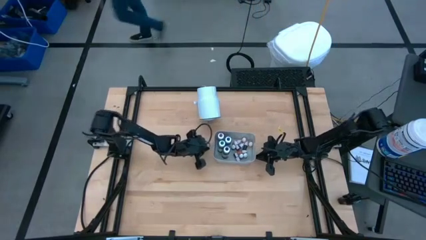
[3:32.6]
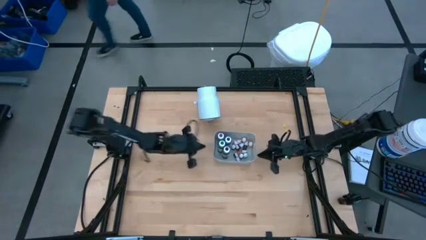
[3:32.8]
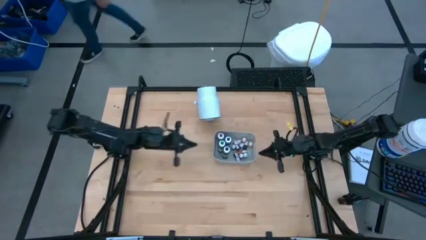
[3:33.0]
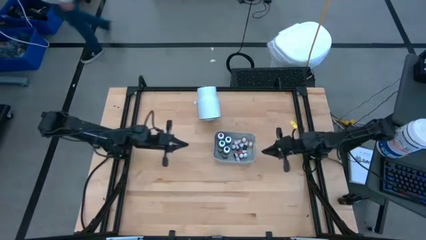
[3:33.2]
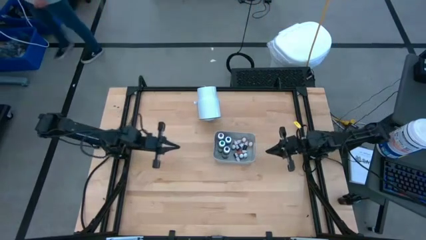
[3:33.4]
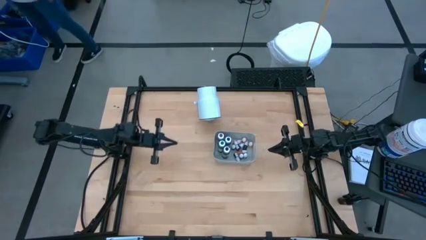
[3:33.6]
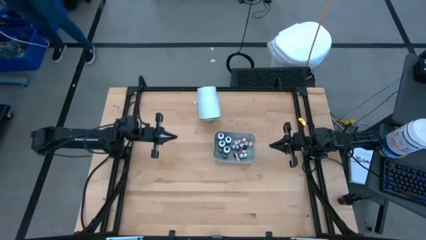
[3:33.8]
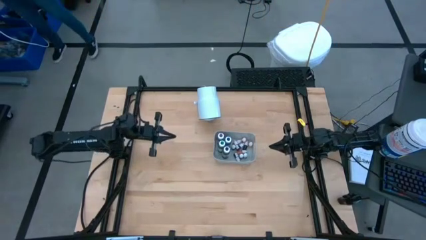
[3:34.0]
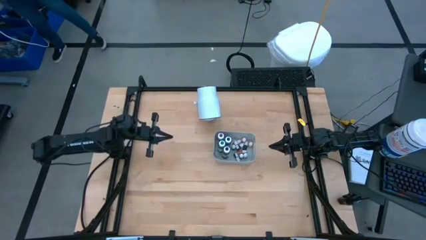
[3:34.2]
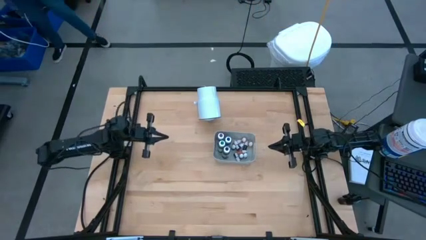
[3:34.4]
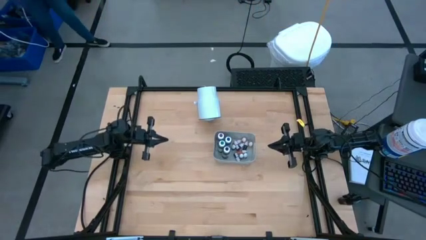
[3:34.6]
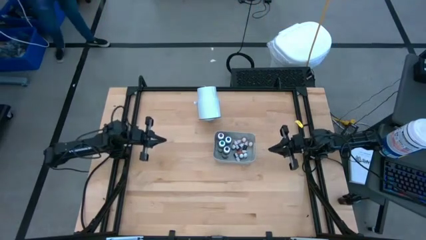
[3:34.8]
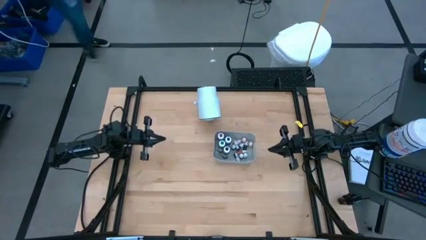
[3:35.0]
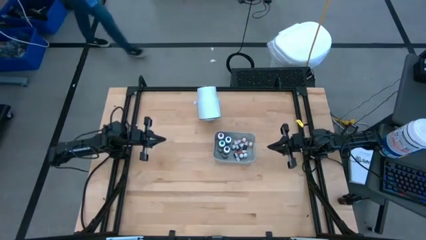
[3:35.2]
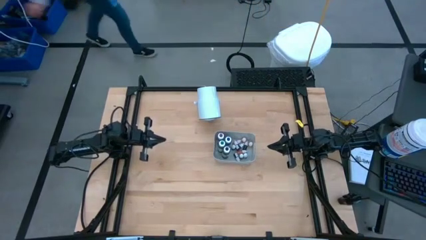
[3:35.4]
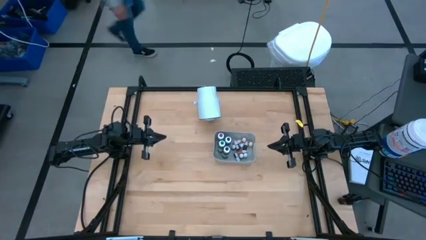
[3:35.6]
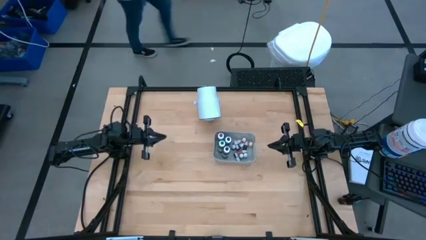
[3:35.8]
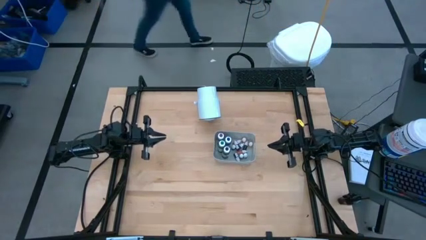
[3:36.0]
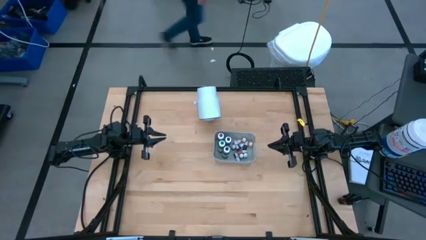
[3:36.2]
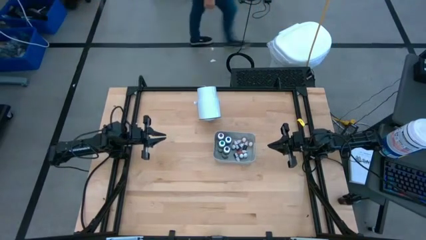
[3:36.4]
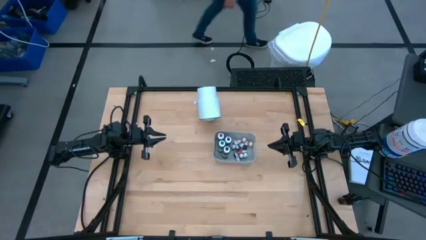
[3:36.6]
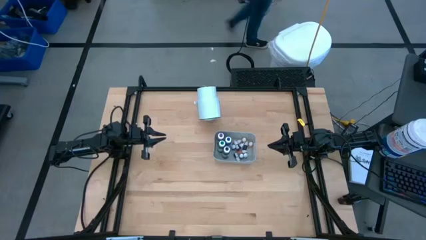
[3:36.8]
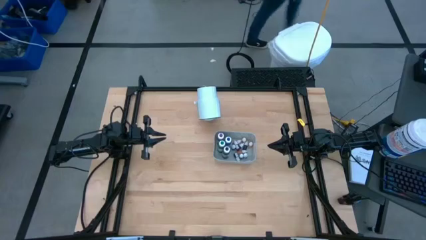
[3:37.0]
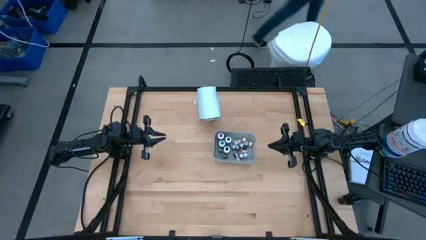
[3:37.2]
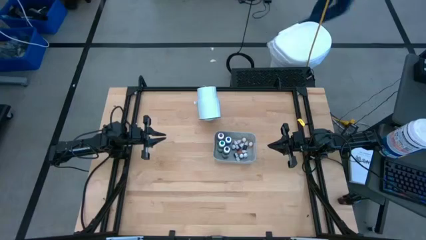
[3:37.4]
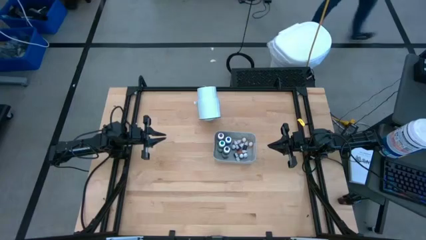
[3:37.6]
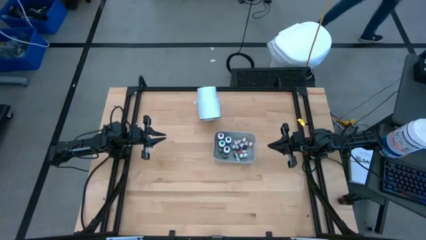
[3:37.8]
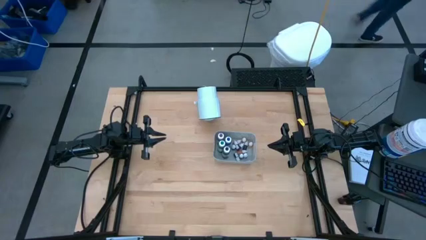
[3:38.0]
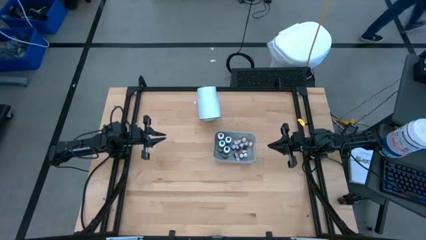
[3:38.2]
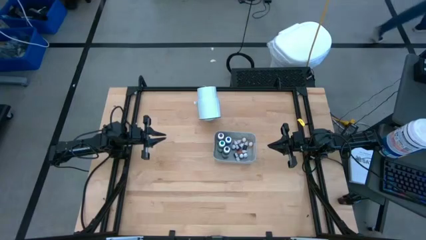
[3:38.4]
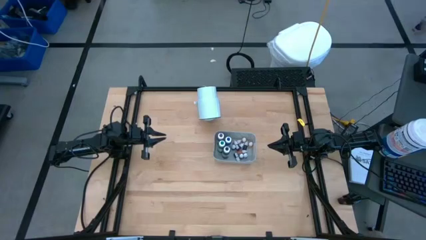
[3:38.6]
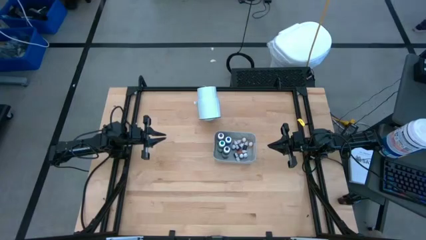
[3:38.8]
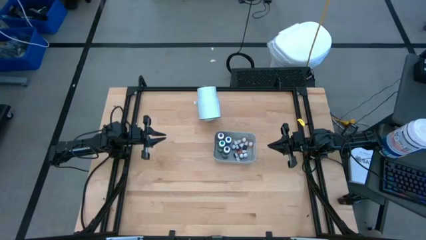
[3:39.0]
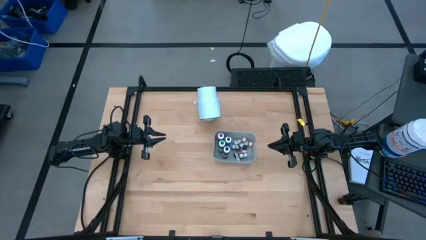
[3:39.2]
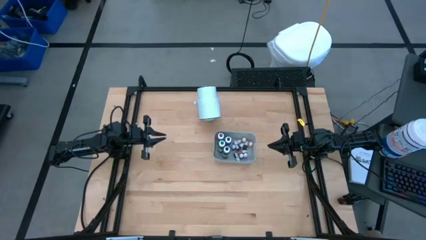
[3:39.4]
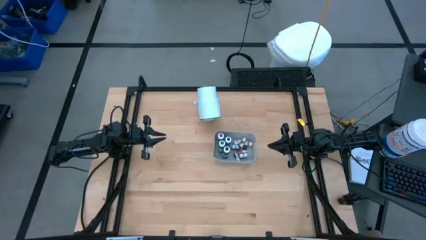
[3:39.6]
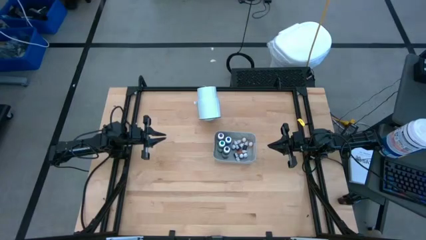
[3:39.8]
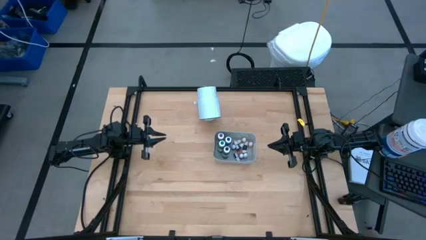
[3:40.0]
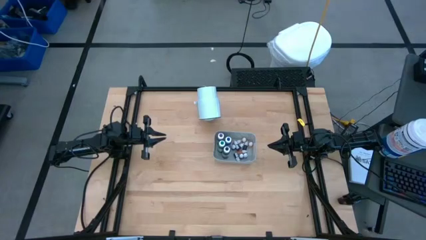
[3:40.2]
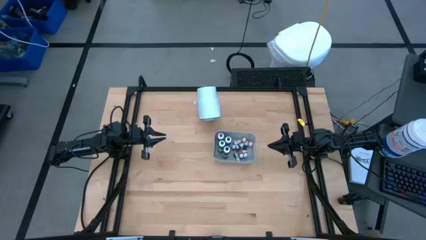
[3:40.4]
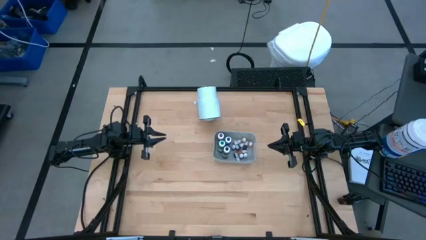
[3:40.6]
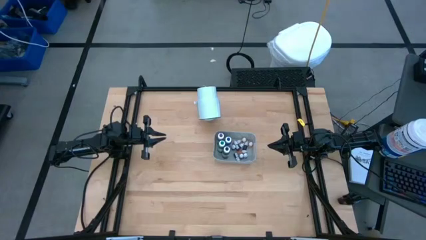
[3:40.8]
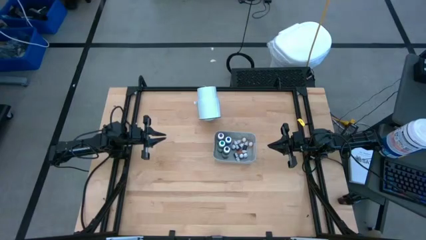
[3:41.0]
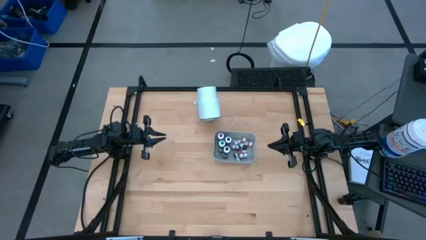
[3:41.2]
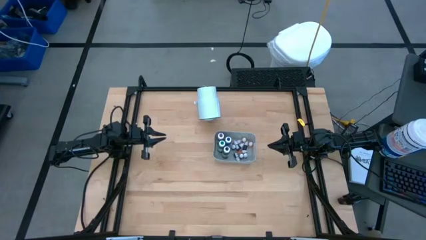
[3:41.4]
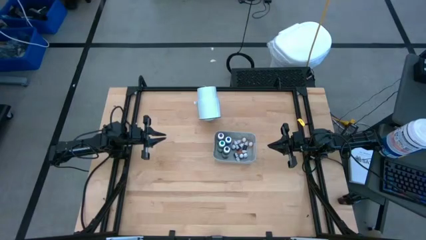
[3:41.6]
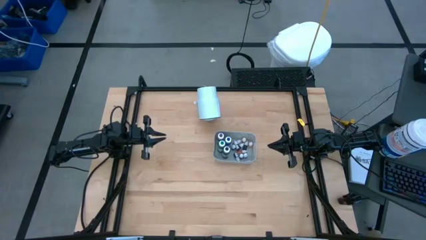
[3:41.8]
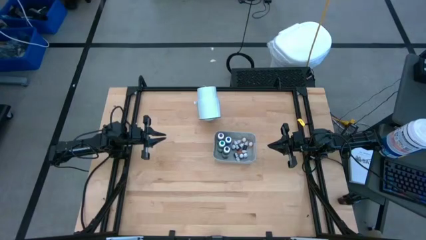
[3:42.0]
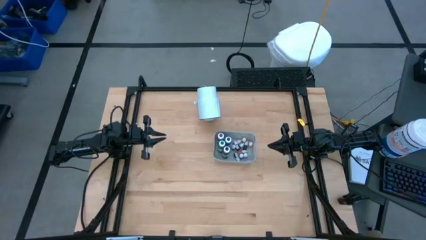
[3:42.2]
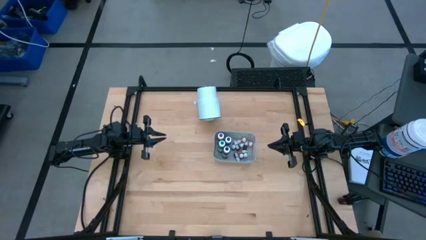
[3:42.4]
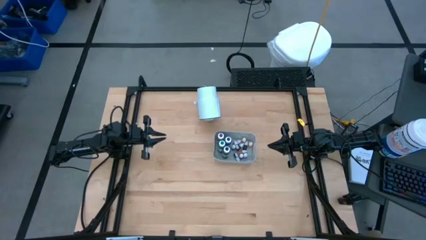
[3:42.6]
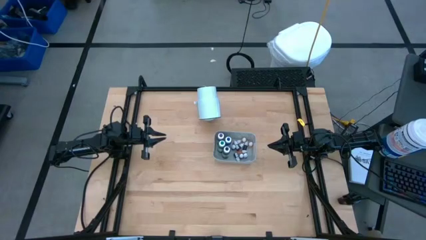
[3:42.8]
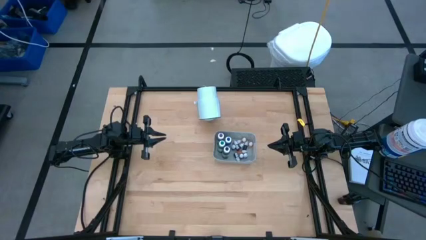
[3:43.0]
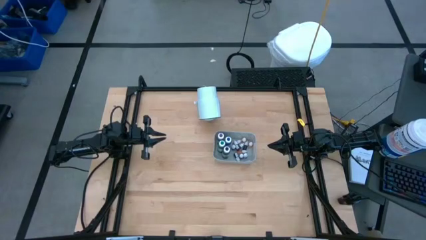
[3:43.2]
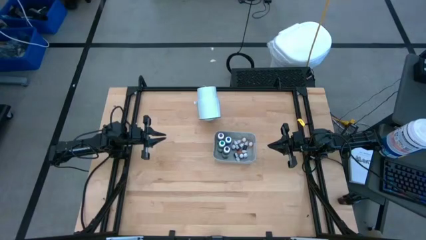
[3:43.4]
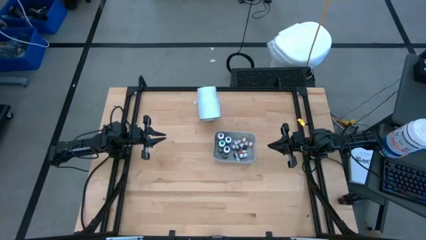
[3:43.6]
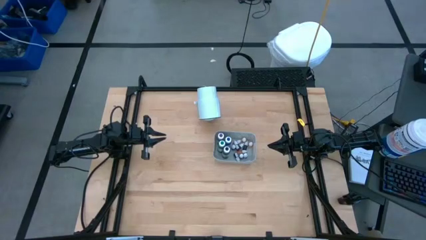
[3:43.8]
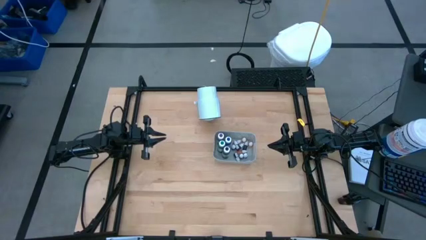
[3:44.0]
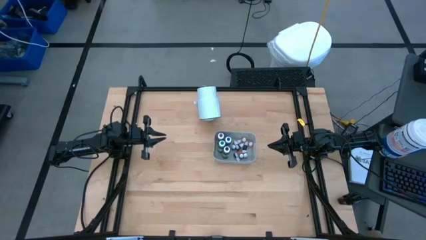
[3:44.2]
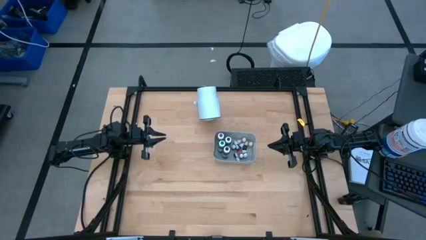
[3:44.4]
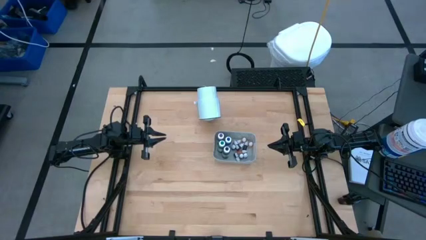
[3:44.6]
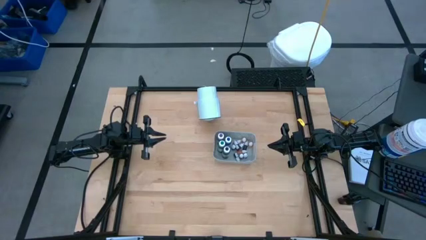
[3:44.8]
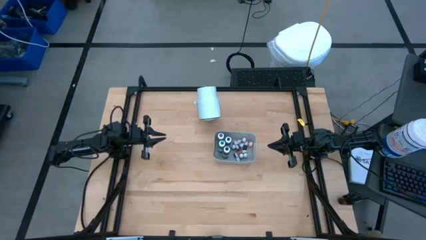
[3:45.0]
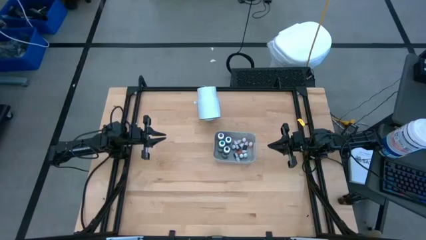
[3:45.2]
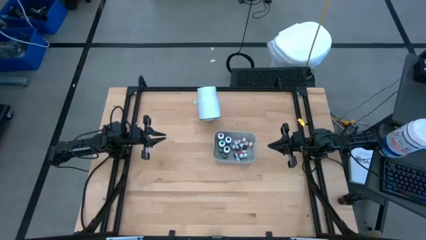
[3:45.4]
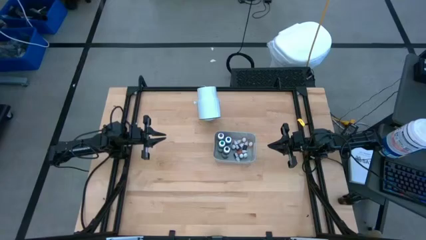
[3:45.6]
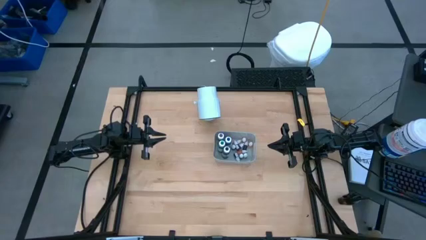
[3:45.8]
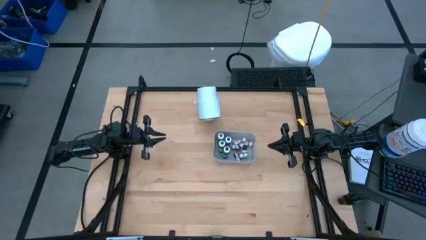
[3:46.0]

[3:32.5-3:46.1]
Task: Pick & Place food coloring
Return to Home Position

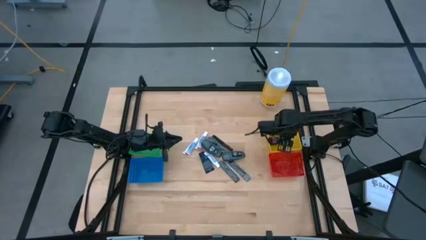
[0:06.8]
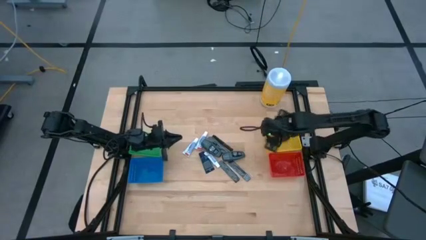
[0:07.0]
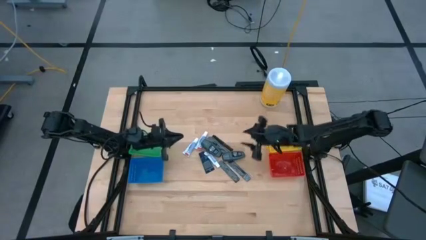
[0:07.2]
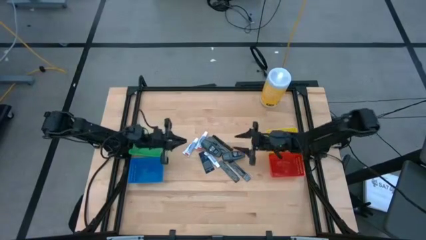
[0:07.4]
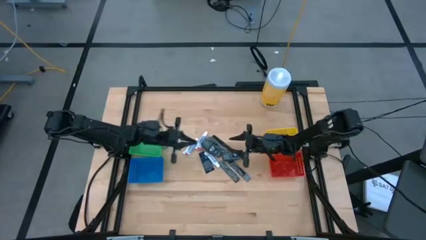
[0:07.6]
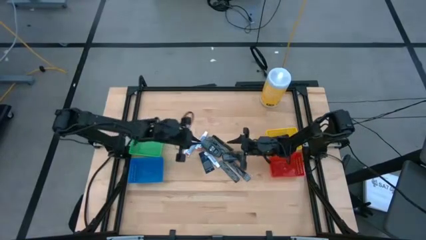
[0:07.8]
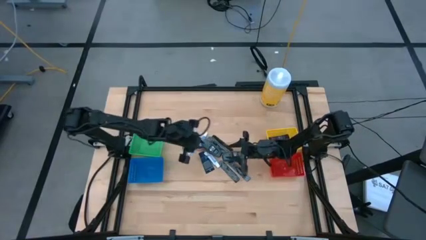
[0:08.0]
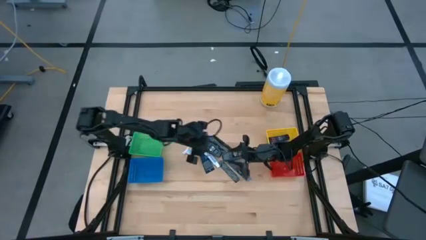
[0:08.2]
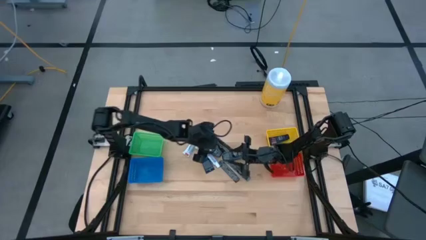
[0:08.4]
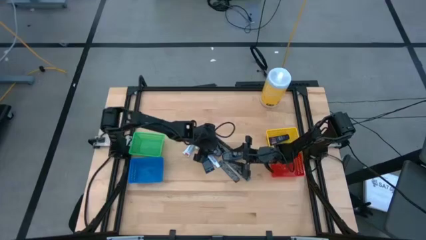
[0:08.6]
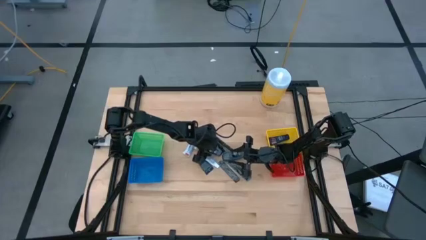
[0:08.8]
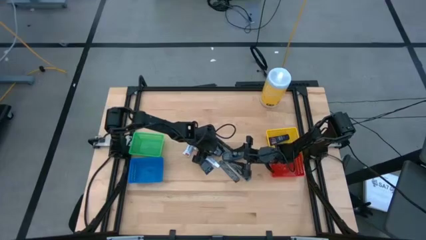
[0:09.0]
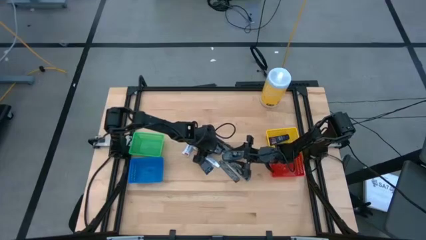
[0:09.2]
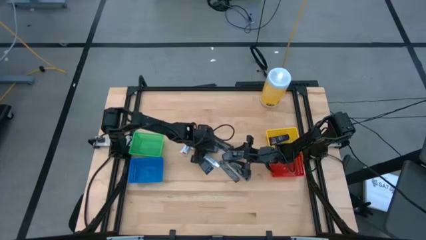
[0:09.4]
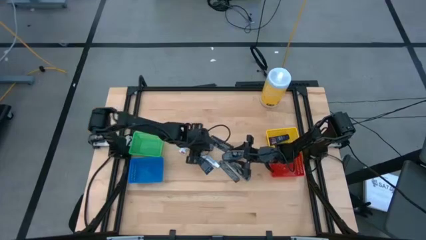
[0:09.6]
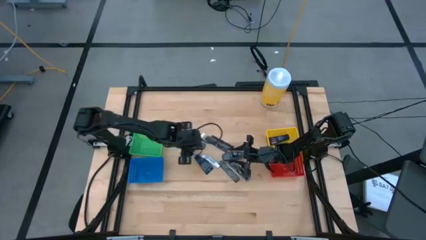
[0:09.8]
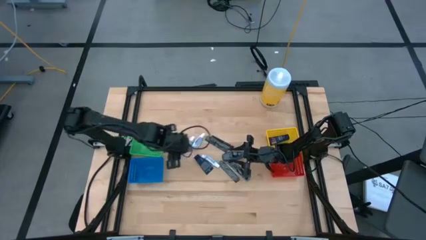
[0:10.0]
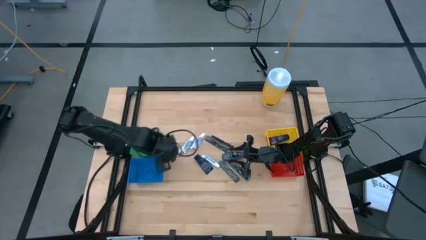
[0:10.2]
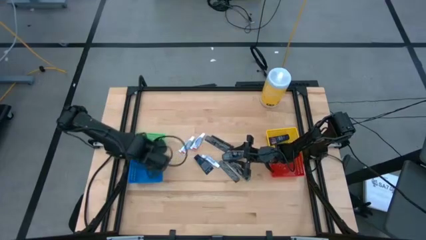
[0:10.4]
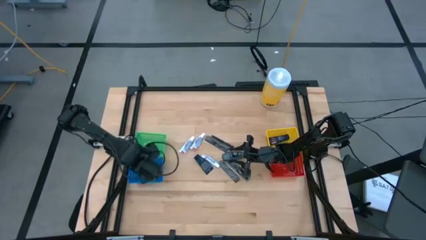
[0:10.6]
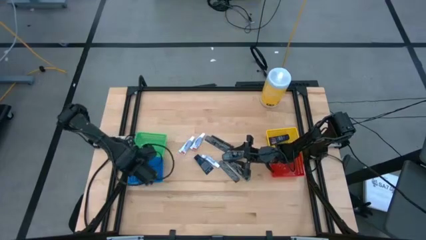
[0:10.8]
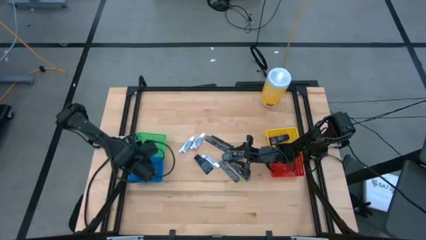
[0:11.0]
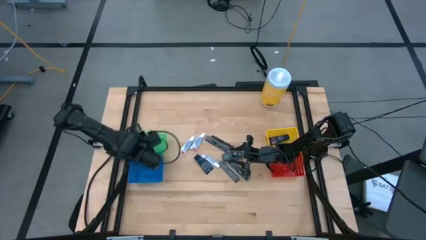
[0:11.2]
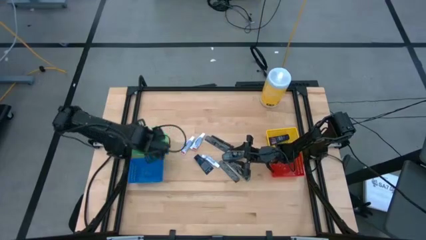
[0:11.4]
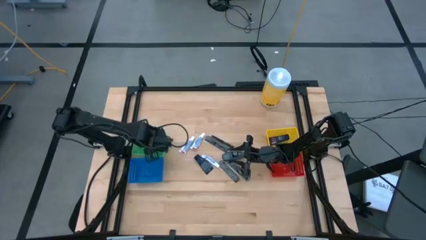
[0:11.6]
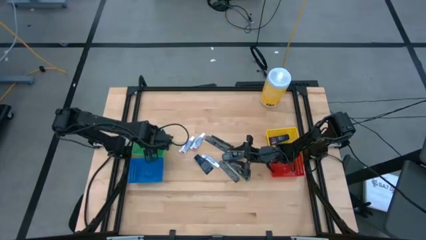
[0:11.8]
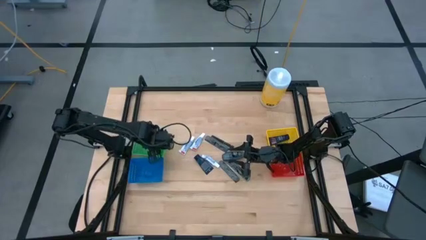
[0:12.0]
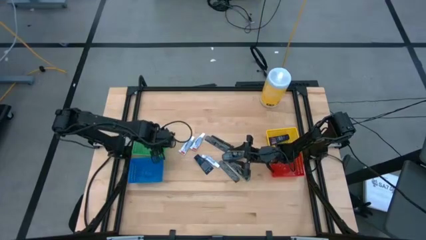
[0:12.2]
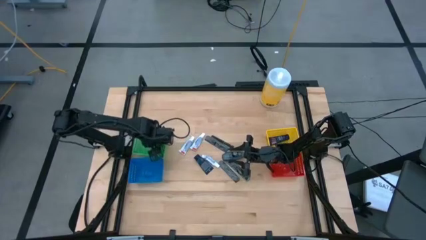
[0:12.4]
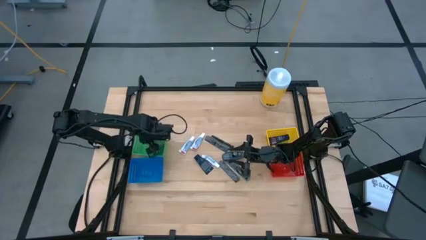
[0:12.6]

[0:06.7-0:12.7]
Task: Pick & Place Travel size toiletries
Put the black deodorant into the green bin
